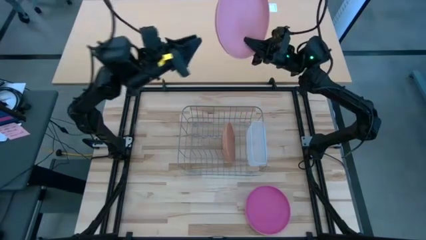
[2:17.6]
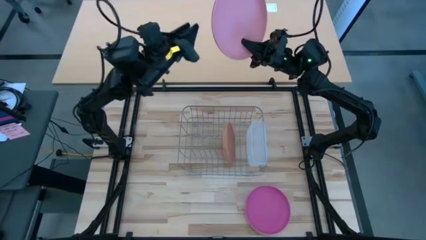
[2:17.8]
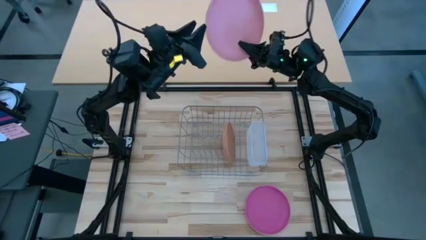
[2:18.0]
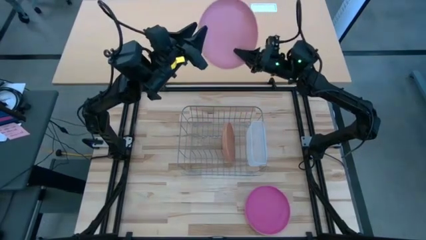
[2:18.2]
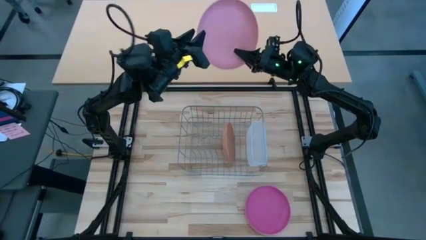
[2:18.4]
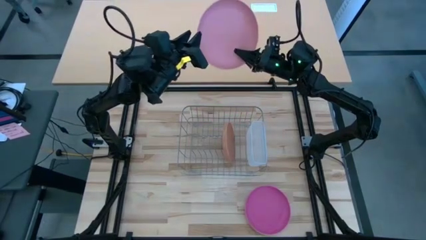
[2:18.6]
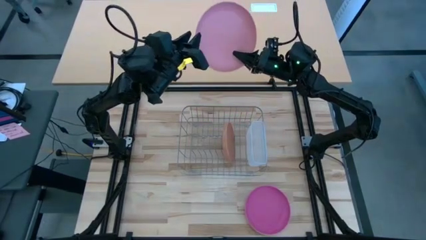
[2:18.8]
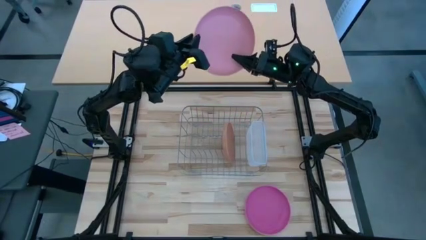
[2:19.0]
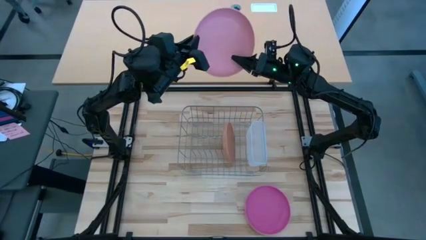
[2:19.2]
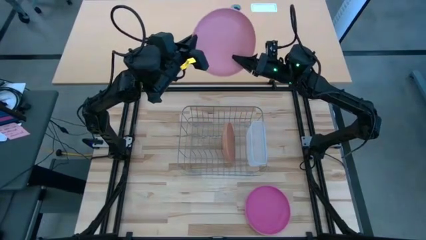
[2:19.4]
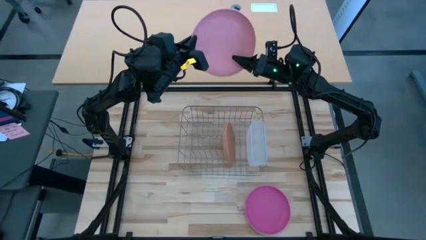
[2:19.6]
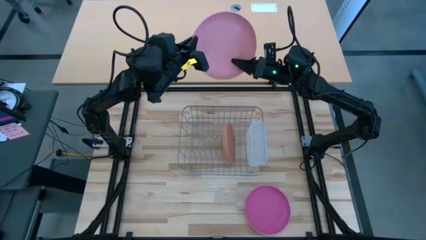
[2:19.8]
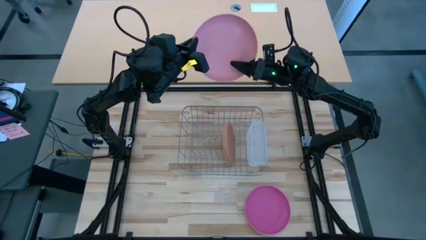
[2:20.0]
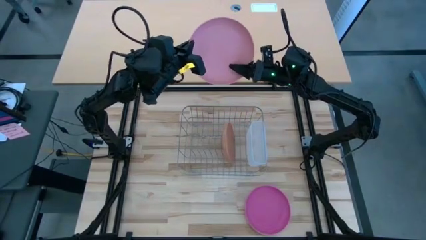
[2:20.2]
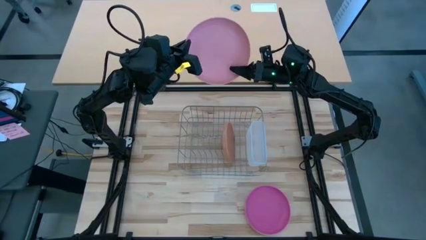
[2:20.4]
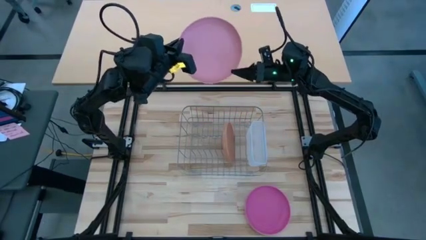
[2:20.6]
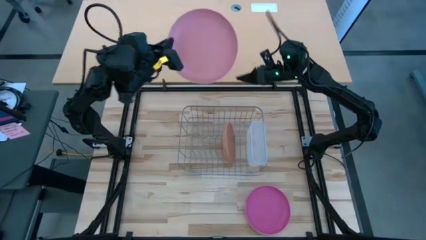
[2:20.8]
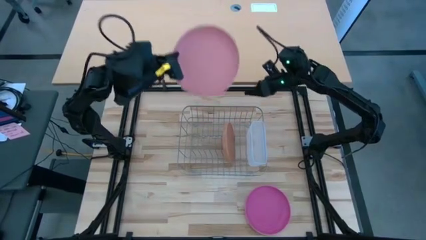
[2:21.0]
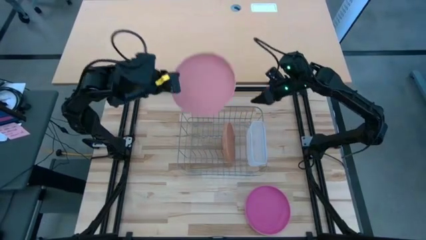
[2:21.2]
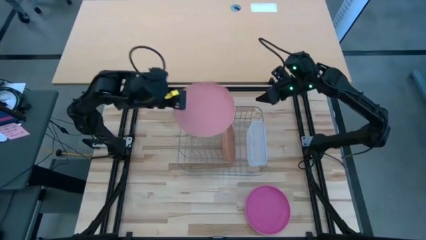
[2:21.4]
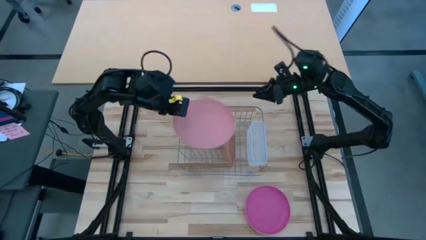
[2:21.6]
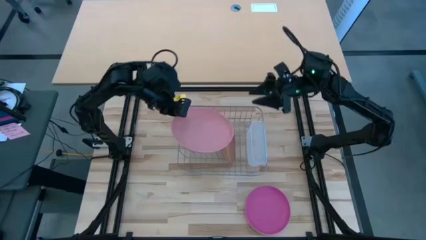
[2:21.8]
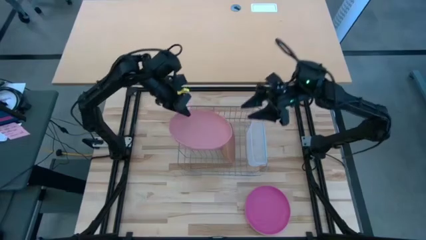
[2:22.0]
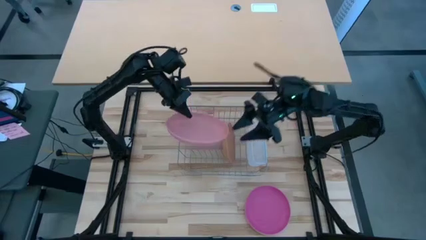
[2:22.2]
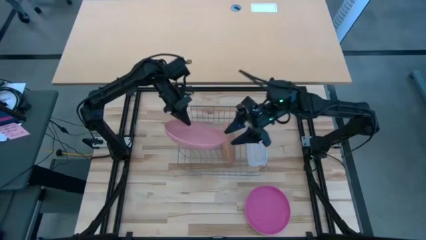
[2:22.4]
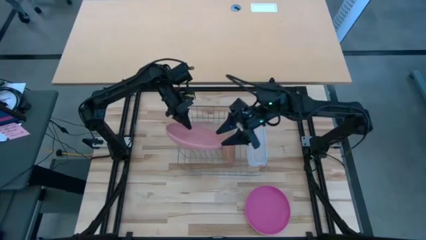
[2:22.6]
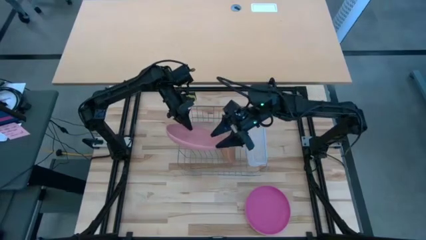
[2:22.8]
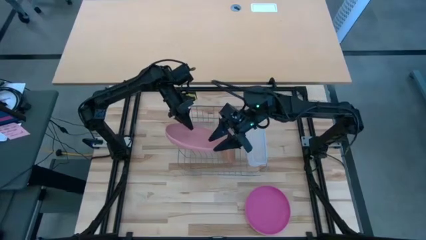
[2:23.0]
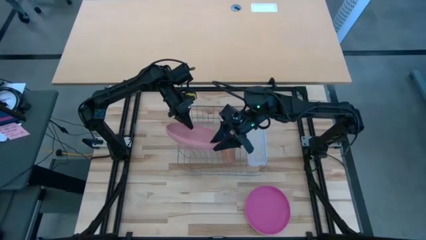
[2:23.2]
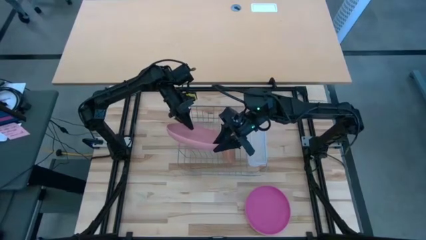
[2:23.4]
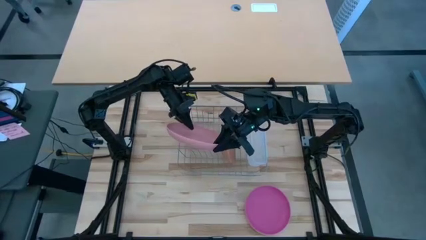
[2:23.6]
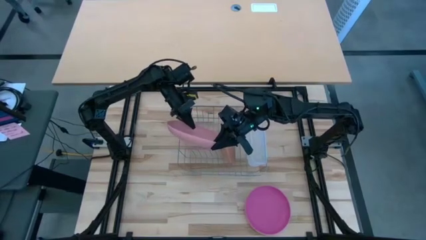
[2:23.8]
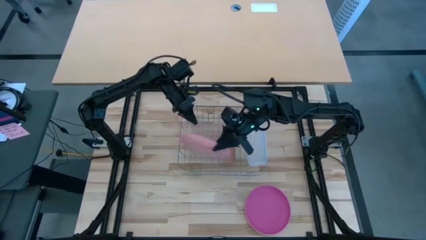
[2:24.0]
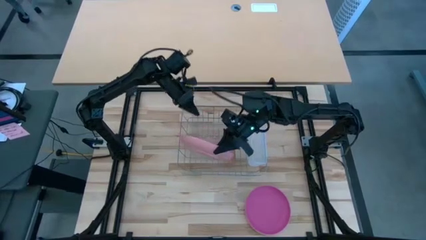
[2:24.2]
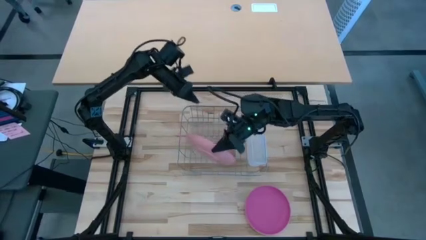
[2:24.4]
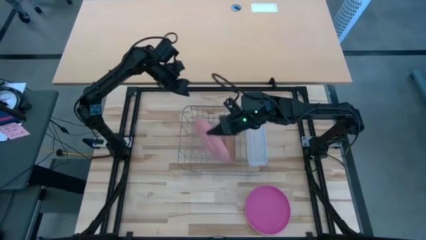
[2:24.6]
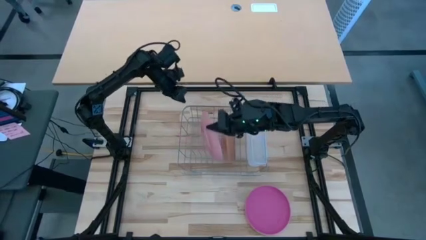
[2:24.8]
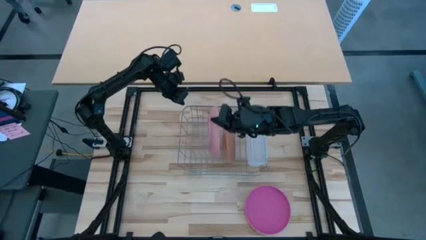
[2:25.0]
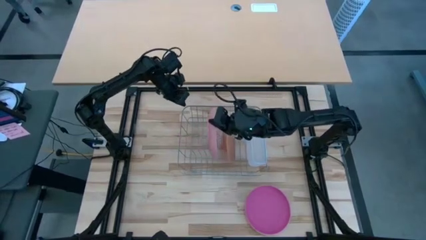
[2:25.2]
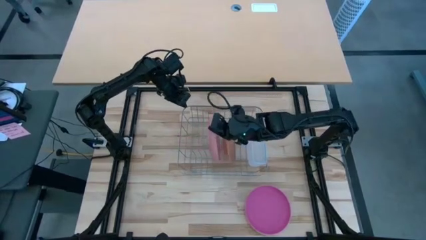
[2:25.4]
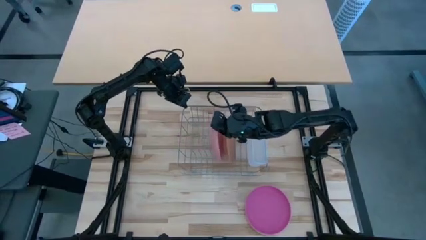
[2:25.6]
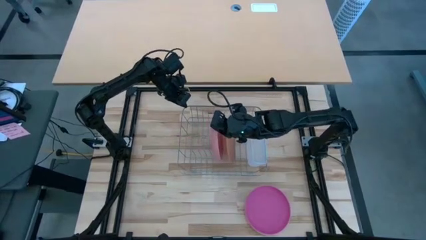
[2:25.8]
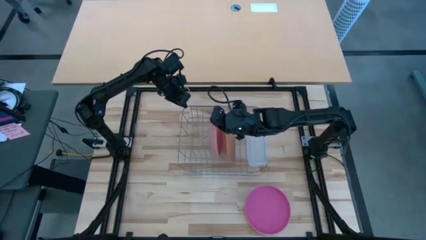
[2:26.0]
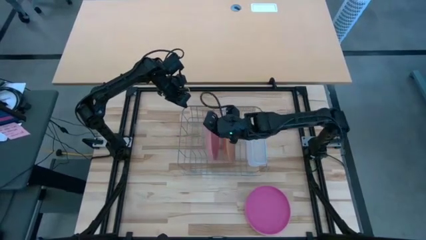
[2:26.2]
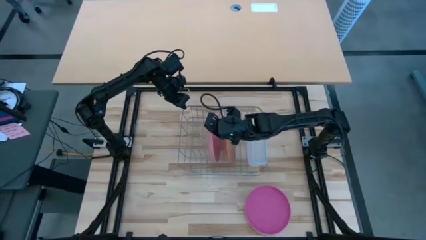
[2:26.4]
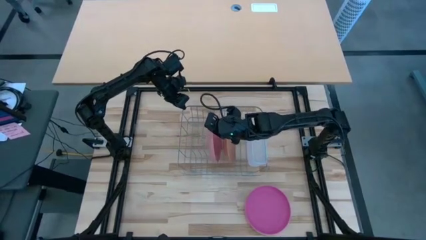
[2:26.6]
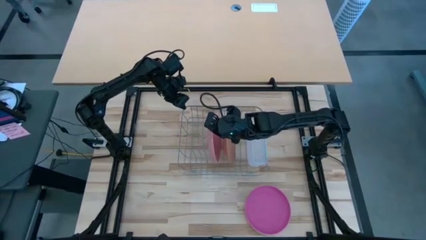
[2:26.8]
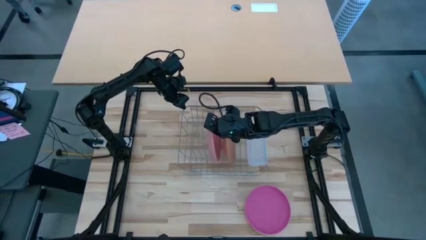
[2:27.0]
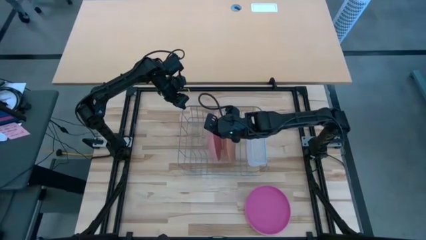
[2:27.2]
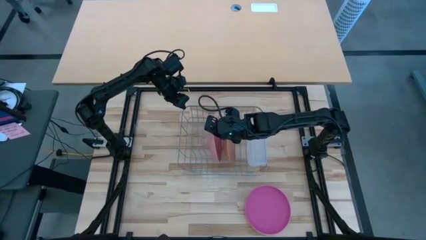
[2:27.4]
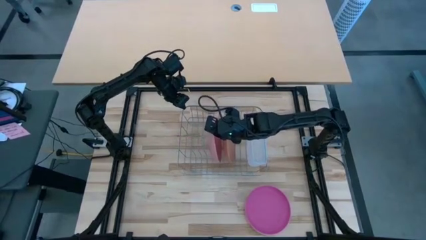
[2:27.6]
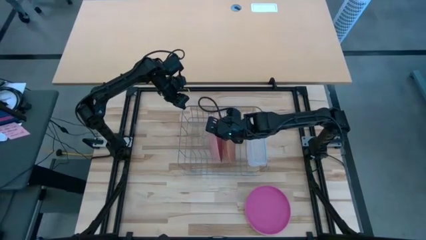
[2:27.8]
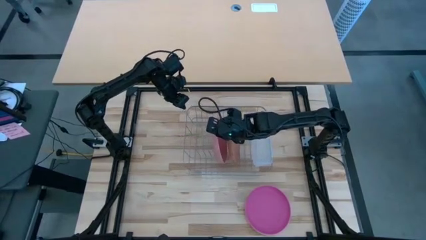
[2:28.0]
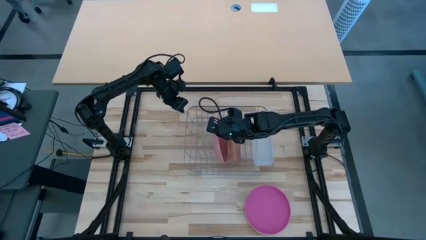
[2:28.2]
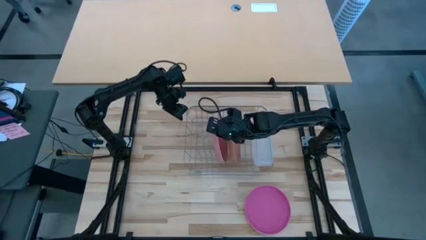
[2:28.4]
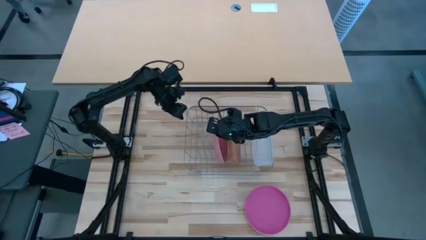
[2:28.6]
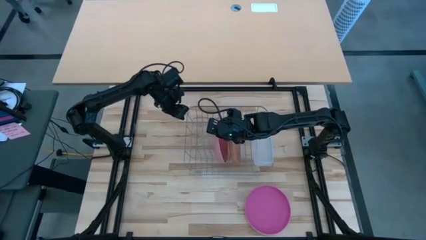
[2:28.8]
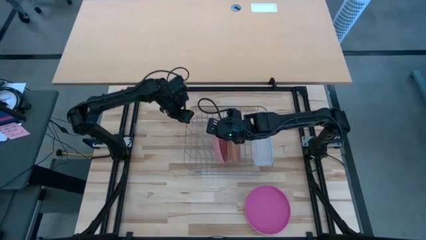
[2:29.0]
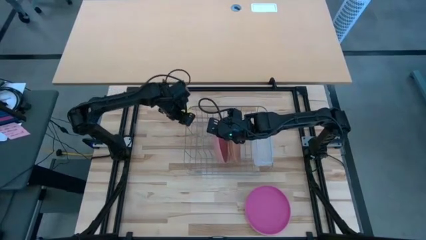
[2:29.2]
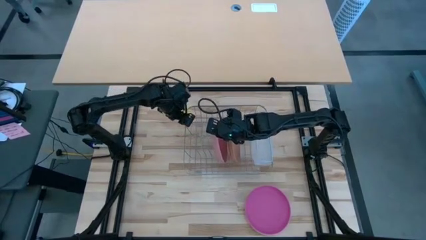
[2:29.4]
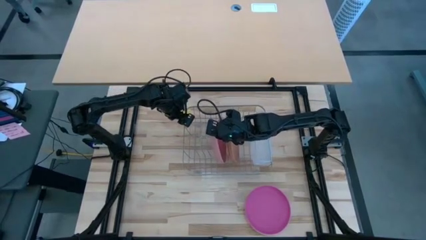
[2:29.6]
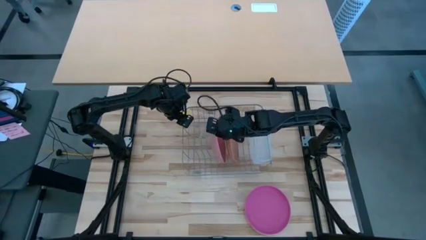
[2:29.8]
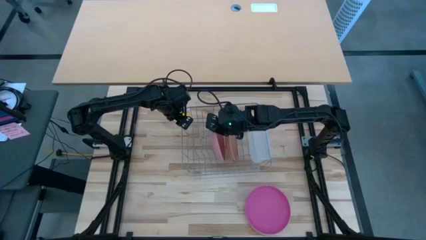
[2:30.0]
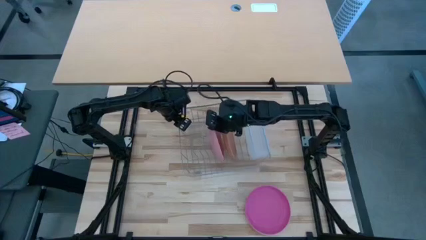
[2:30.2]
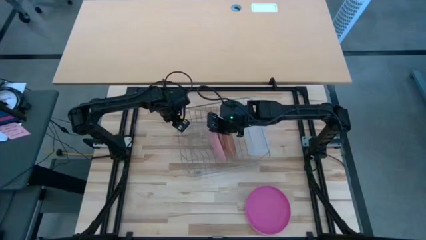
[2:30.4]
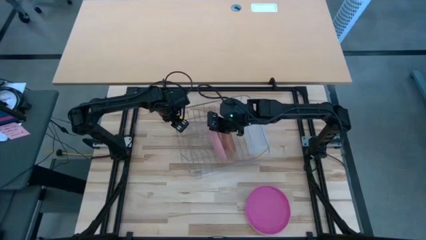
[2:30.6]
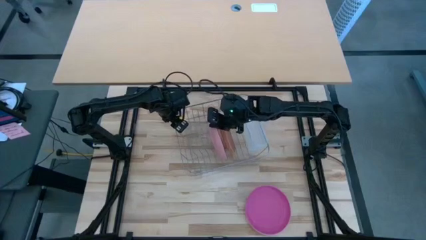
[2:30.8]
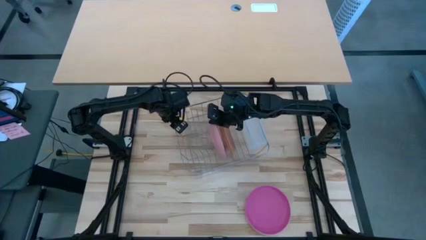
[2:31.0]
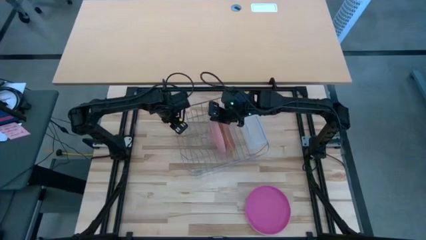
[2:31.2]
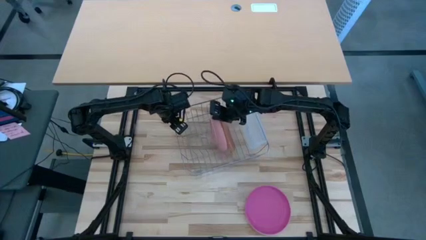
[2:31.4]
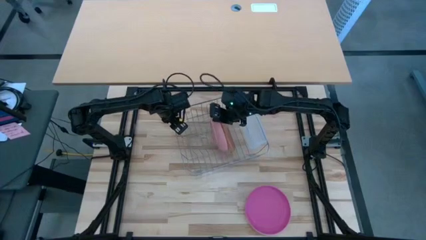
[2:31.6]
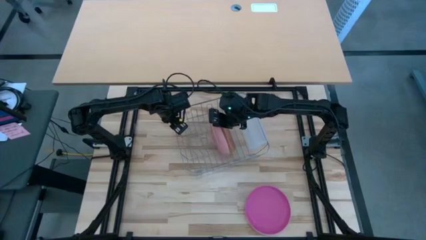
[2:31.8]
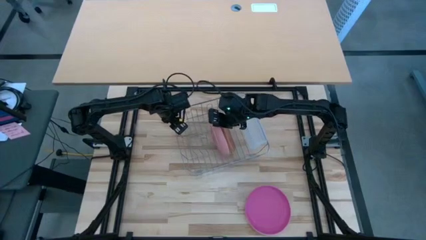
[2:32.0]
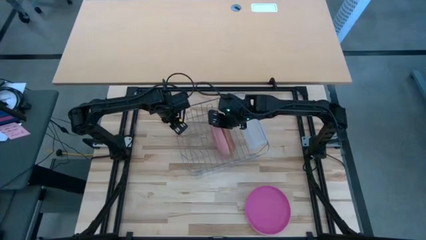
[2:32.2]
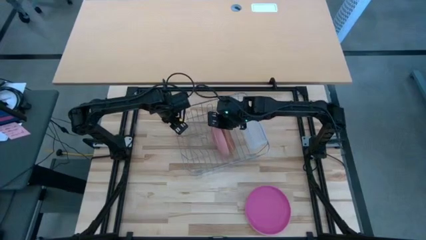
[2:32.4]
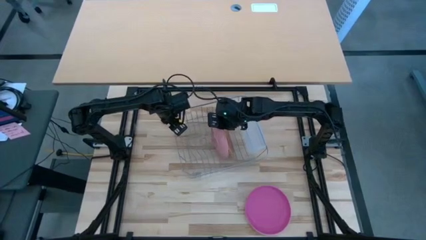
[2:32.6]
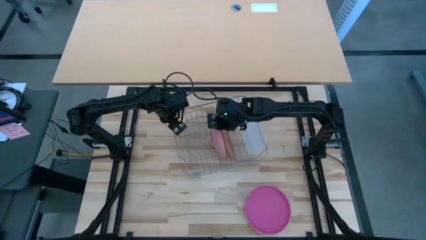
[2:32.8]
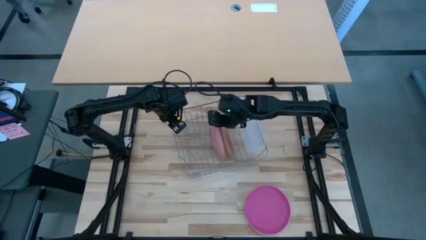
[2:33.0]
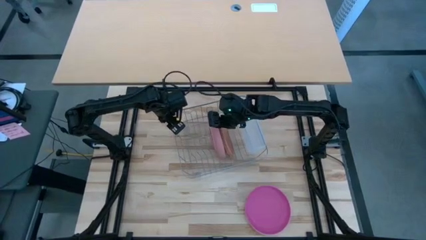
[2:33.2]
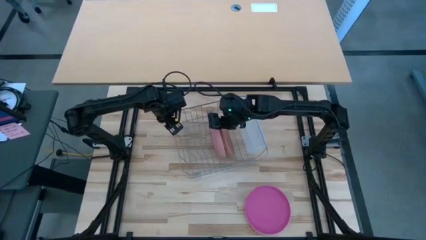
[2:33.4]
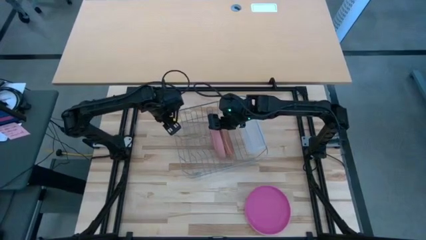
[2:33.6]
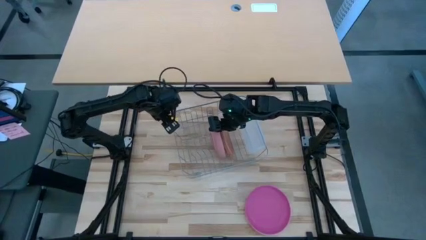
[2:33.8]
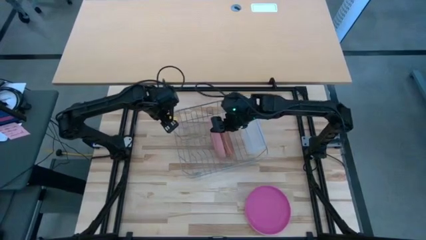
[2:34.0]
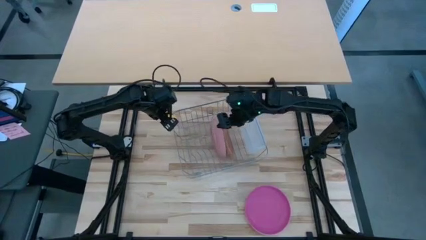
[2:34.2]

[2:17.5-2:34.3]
Task: Sort dishes
Put the light pink plate in the dish rack
